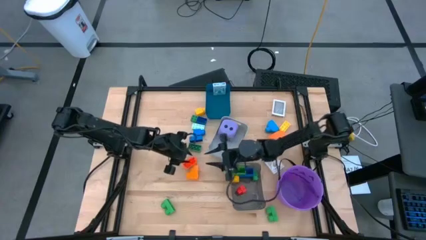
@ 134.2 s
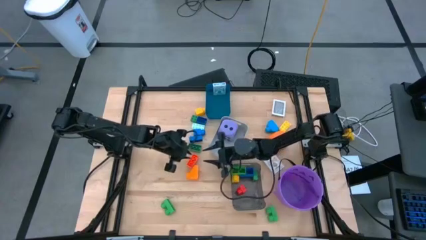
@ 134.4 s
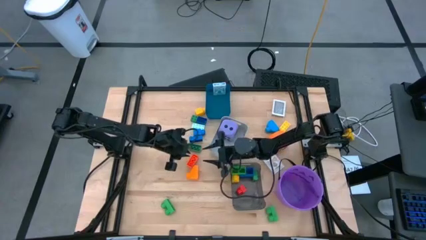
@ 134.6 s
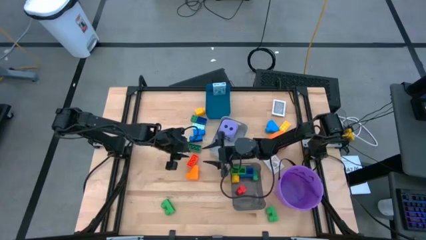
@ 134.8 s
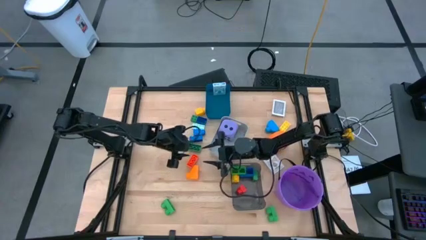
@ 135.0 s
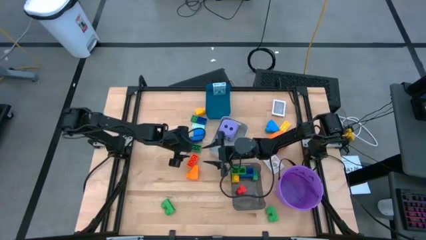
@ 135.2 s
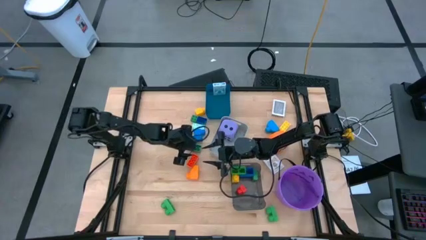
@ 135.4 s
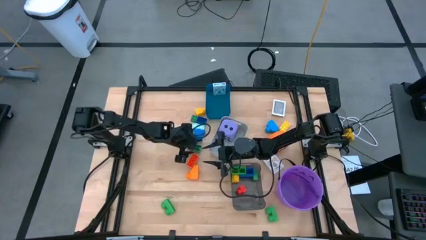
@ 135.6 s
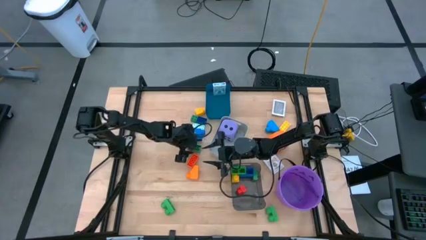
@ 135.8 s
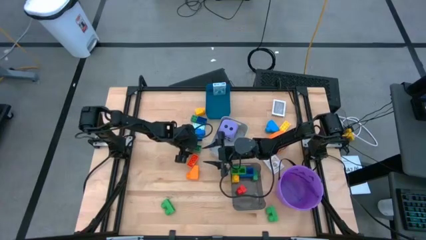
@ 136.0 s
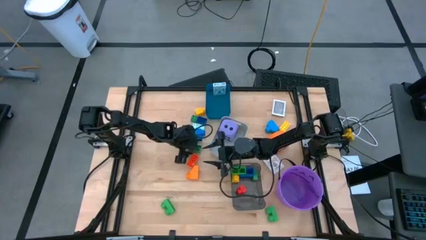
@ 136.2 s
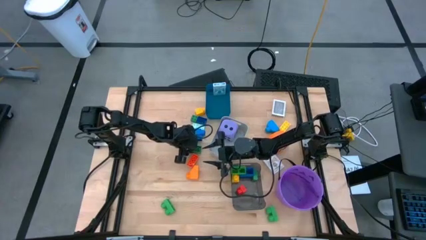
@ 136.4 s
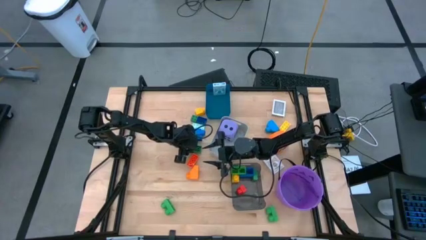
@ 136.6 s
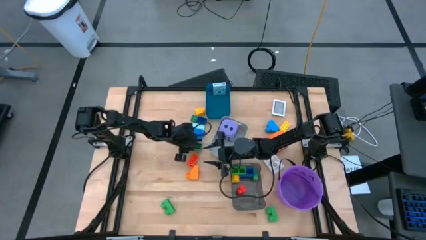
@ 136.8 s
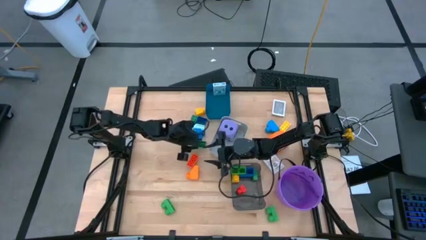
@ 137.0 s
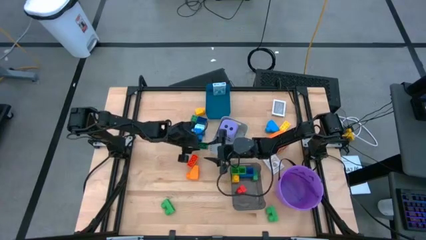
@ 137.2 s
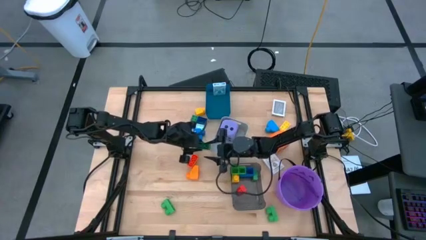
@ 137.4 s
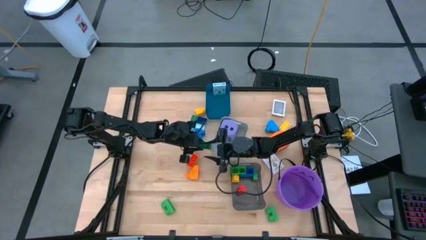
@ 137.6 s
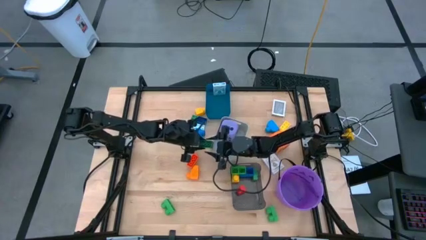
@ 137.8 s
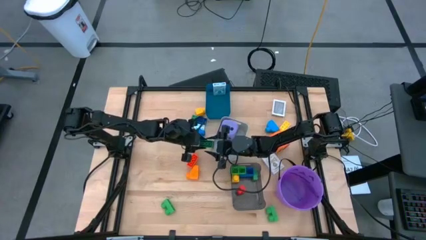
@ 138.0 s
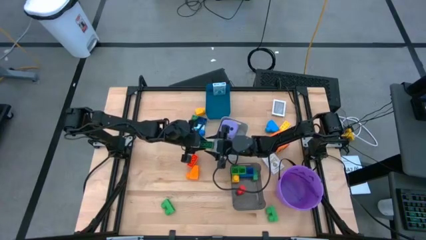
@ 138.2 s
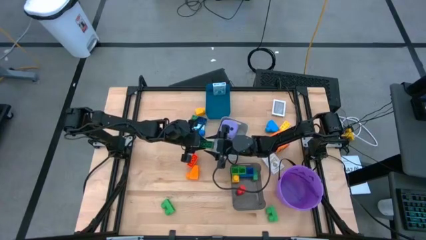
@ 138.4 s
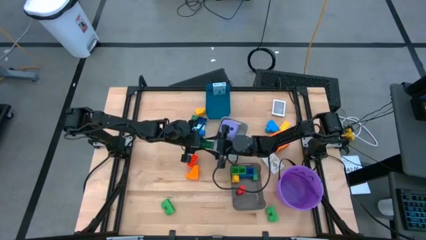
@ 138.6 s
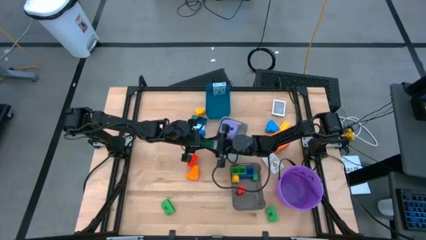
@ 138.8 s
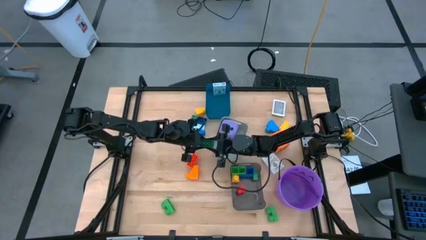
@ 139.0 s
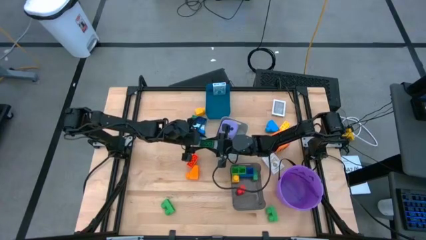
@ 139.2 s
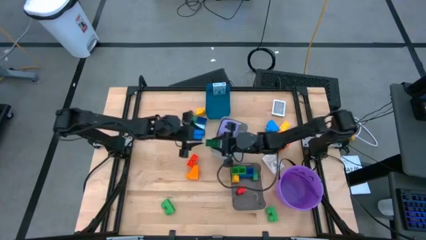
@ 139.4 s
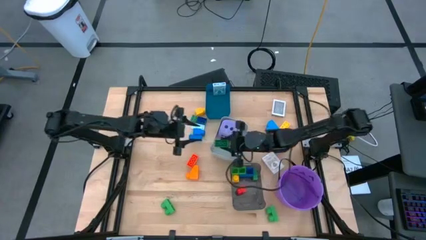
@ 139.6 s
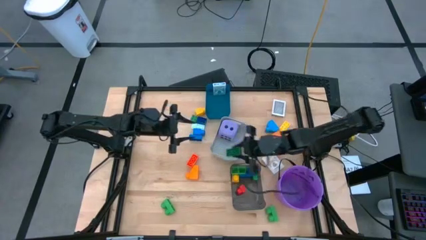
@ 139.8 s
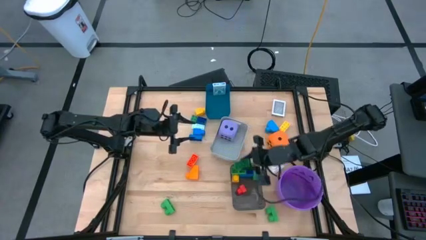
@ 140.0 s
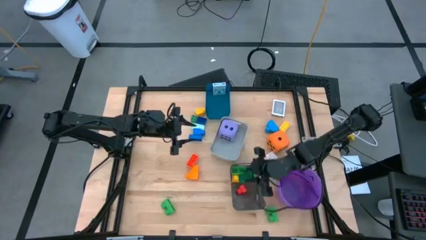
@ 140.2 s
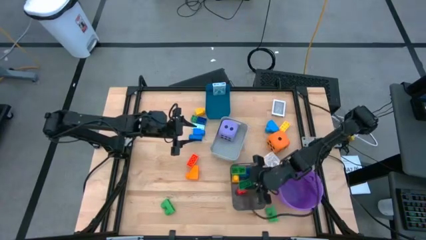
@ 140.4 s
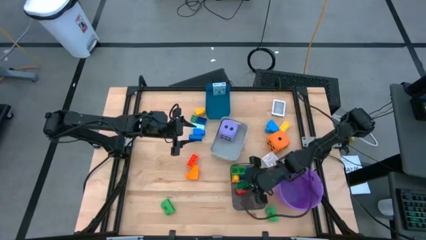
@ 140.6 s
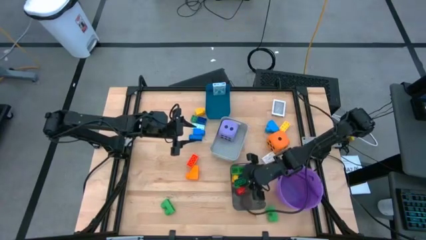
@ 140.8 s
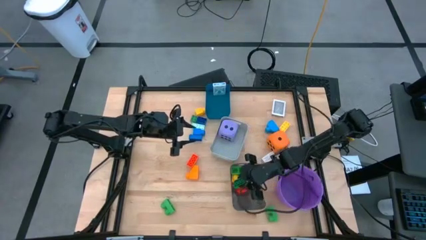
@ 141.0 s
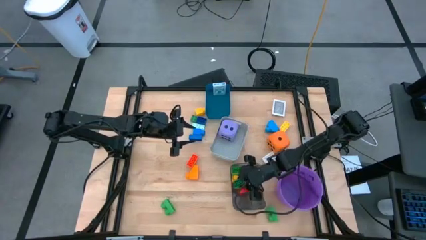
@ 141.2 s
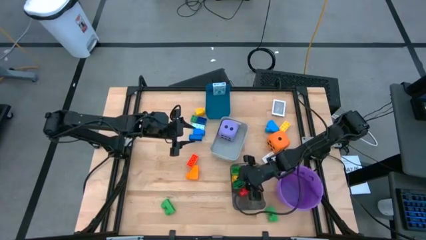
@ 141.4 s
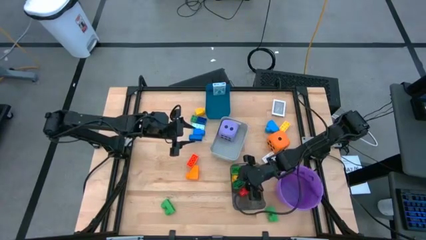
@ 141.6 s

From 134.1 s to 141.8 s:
Task: Pick & Place Toys
Put the dark green game piece into the black bin

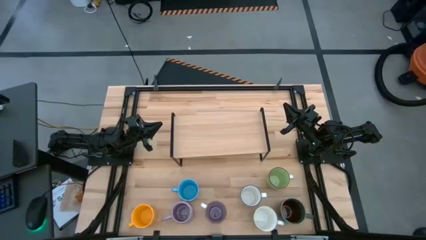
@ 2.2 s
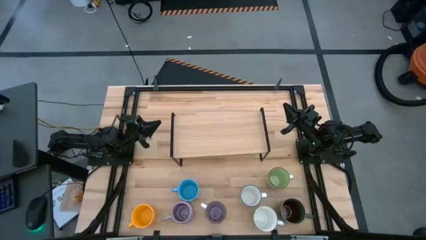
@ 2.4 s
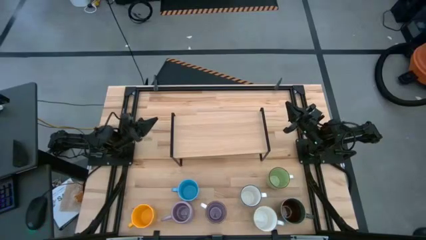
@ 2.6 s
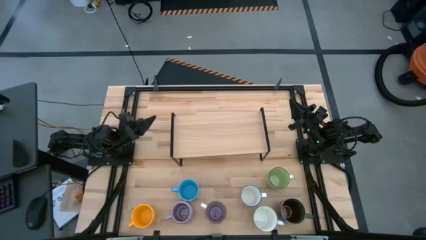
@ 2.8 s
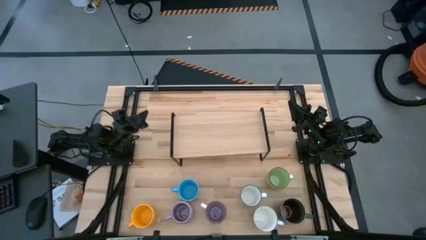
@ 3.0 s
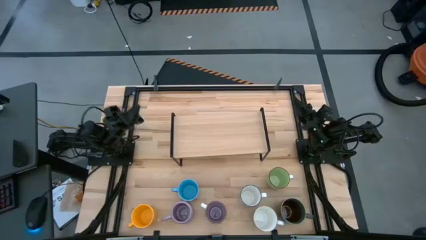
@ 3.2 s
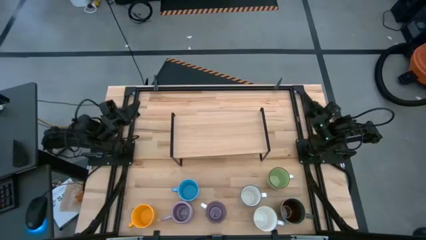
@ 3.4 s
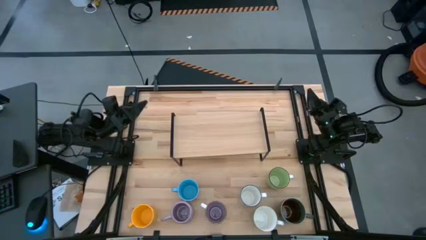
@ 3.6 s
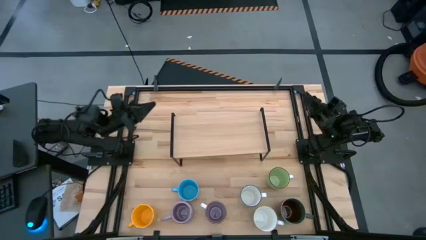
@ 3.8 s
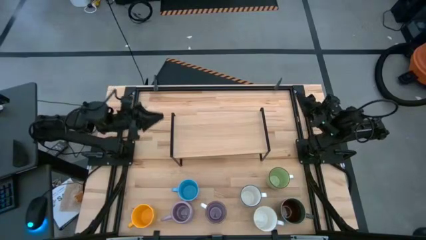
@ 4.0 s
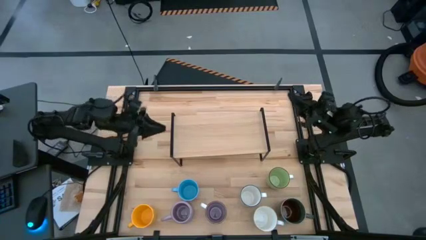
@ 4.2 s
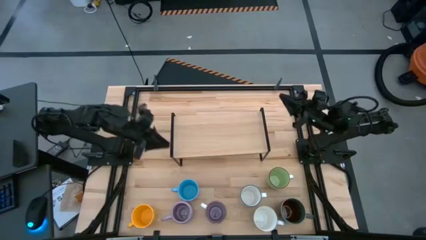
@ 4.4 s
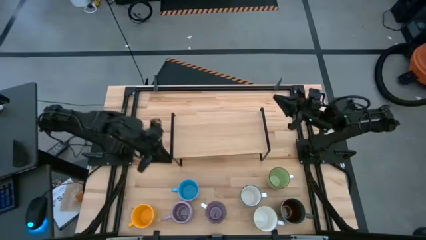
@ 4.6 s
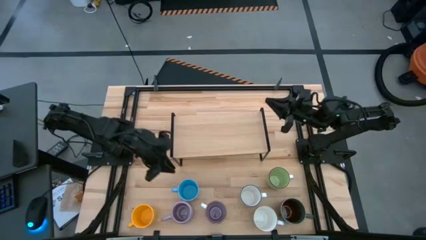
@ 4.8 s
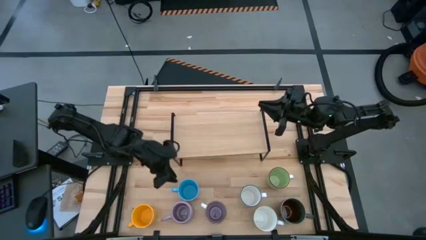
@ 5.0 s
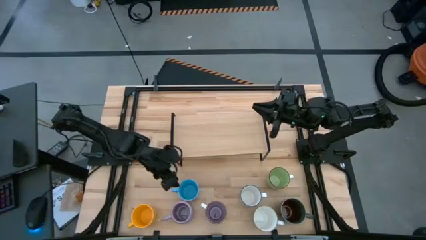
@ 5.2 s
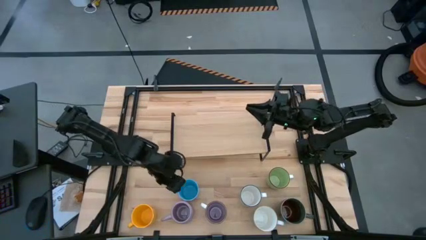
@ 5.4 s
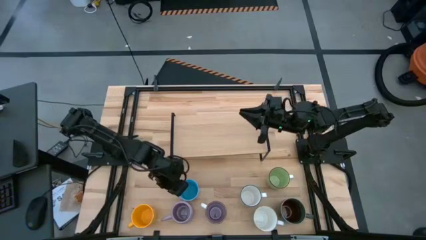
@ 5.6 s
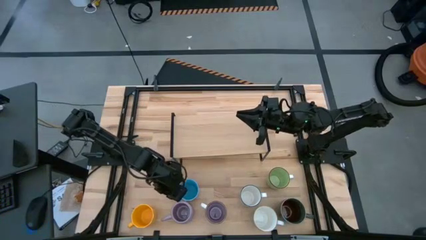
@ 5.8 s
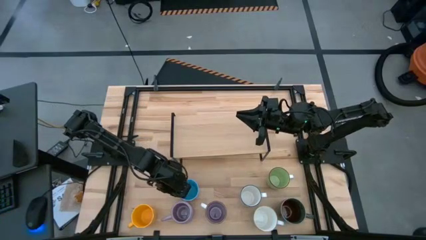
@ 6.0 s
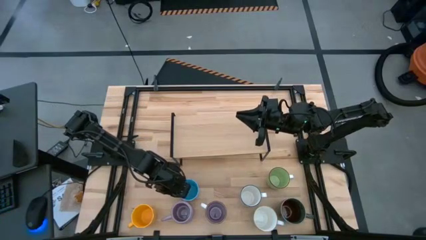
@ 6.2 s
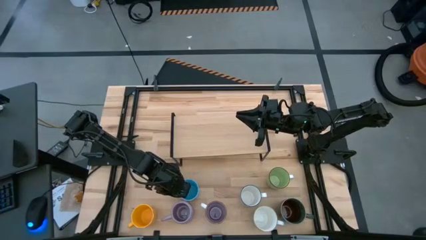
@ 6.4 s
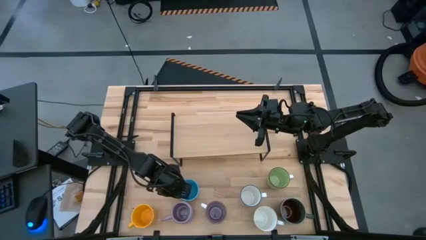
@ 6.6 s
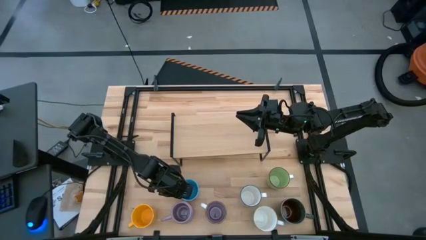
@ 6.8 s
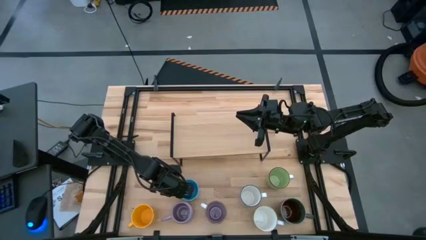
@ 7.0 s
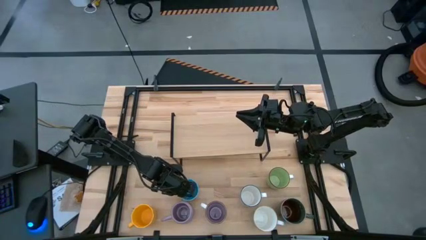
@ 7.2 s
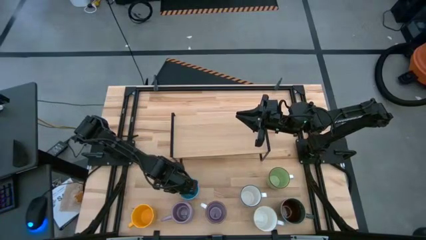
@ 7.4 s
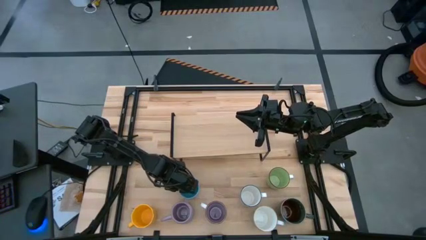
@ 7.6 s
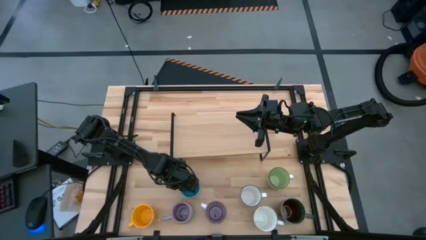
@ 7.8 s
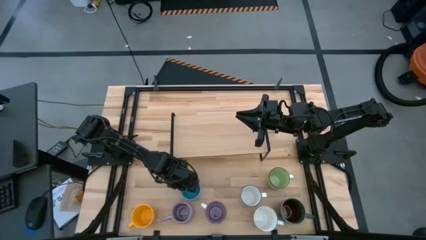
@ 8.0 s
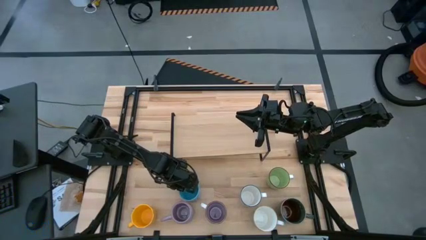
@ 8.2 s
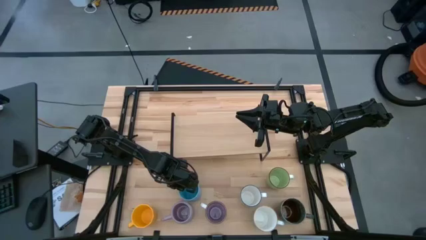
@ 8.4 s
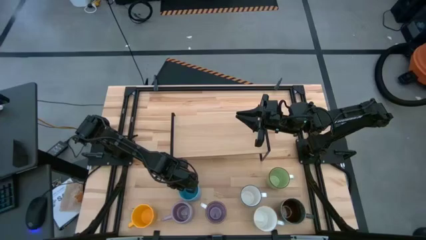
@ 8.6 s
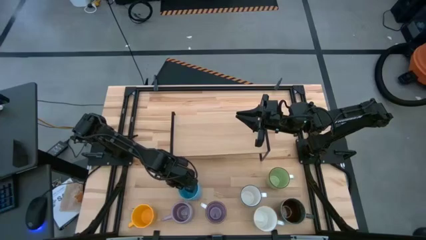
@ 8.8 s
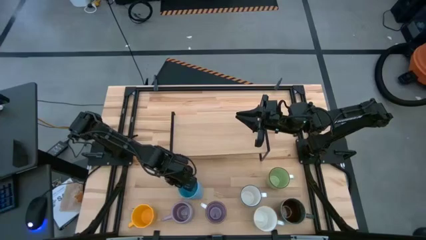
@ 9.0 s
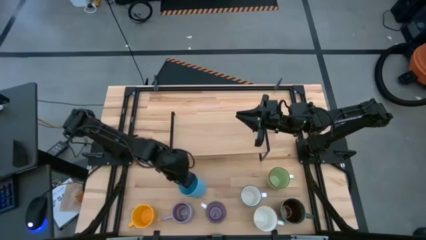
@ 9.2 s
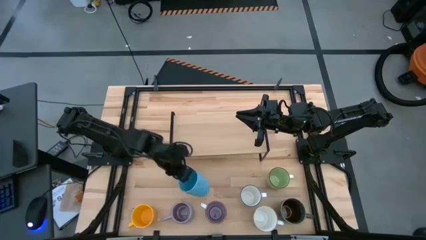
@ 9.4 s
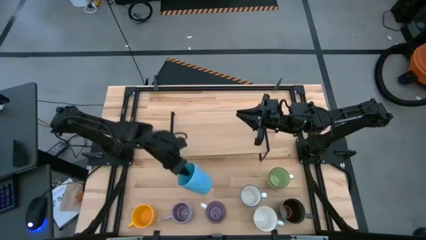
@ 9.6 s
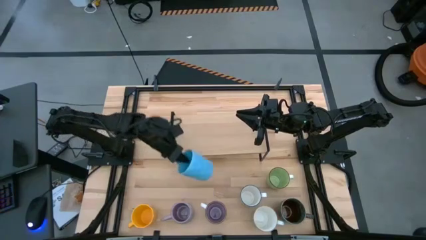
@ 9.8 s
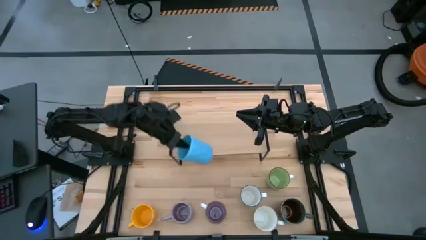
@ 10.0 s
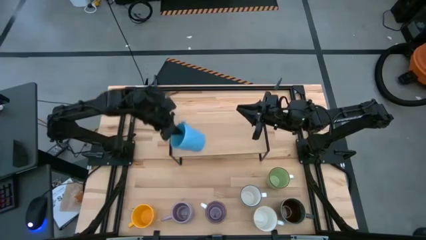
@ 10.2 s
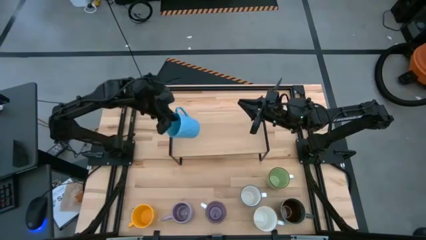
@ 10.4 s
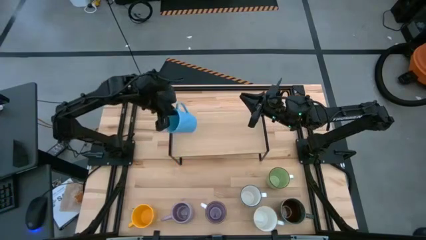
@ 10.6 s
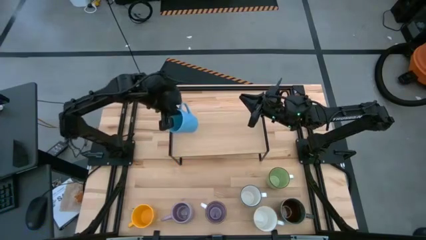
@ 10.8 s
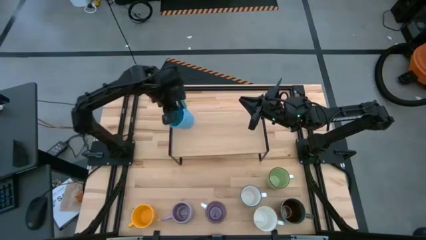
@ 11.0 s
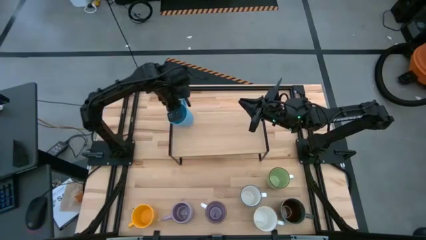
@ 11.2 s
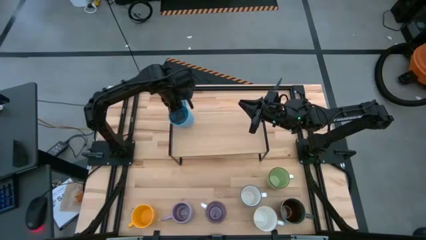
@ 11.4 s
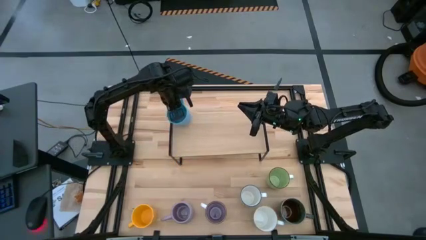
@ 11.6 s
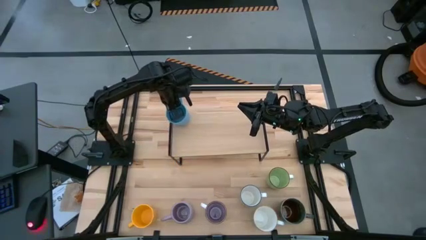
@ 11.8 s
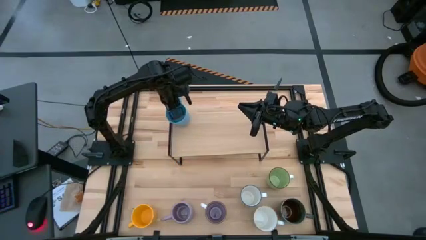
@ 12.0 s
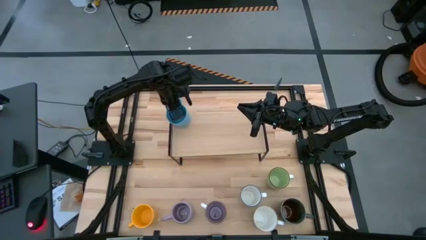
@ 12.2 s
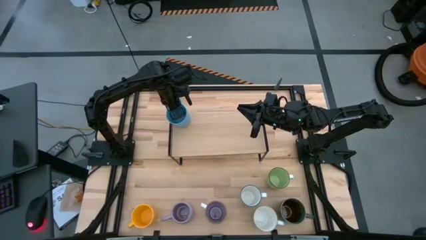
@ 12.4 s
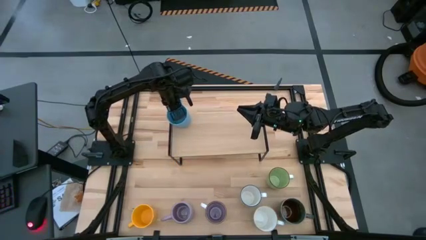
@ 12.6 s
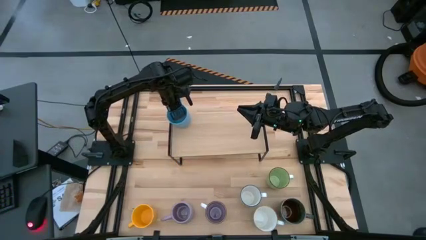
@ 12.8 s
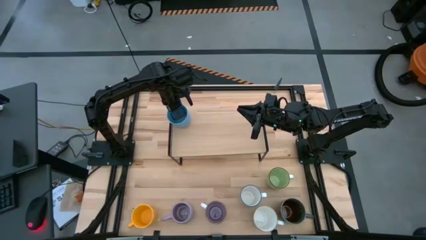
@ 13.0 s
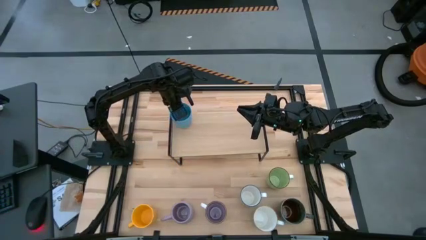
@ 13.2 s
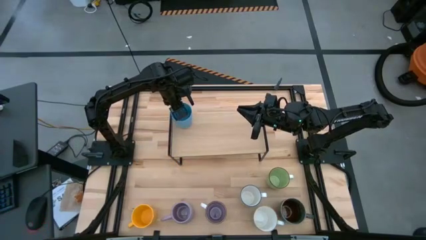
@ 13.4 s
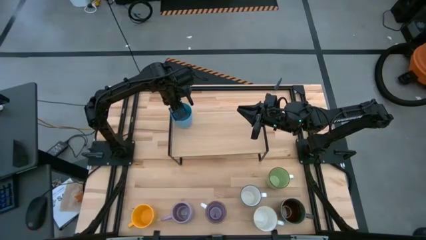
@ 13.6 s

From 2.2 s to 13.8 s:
Task: Place coffee mugs
Put the light blue mug on the shelf
